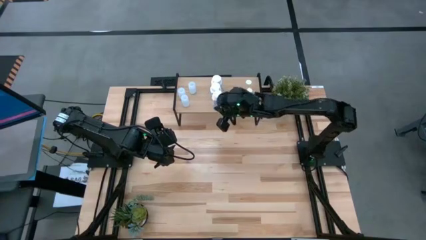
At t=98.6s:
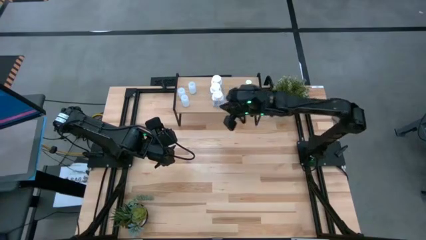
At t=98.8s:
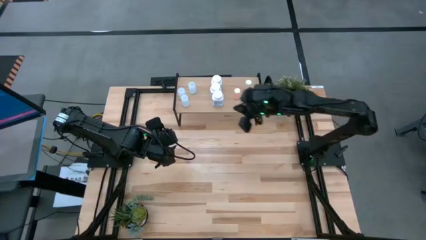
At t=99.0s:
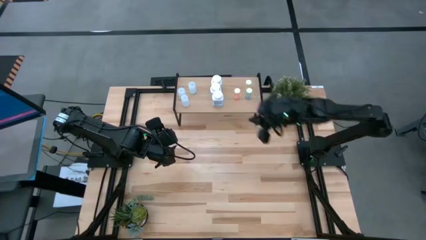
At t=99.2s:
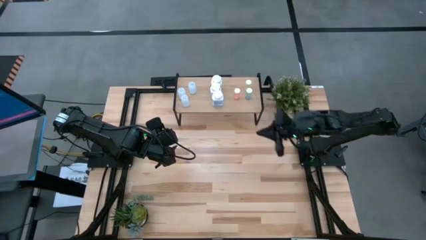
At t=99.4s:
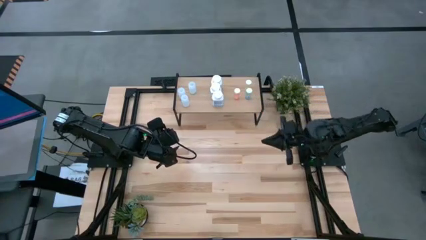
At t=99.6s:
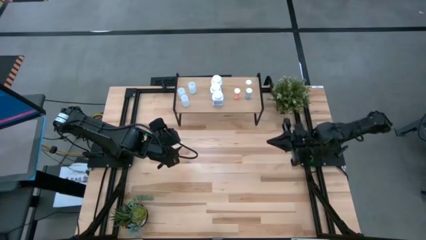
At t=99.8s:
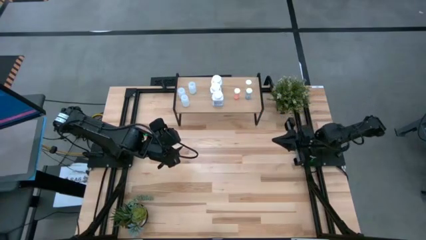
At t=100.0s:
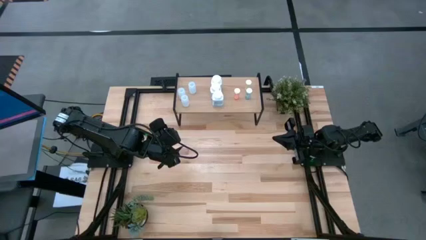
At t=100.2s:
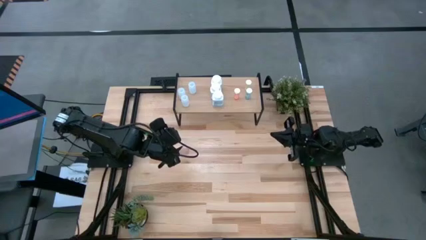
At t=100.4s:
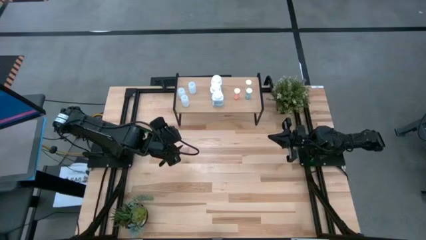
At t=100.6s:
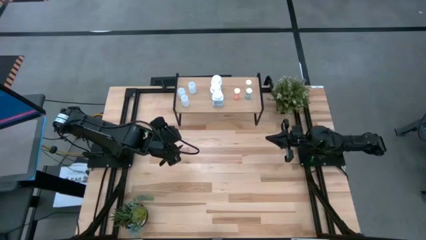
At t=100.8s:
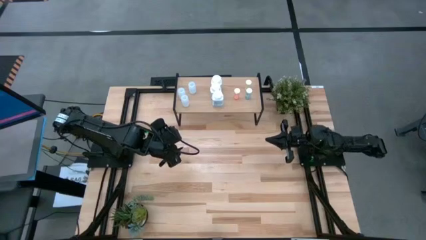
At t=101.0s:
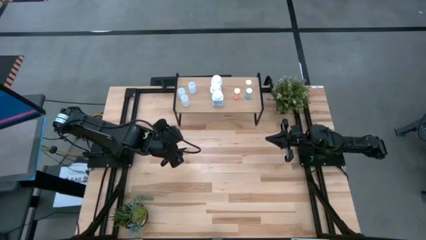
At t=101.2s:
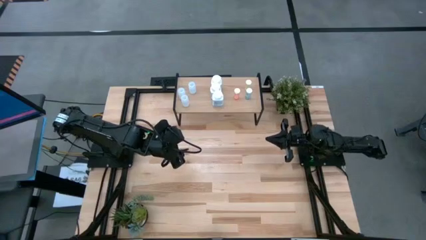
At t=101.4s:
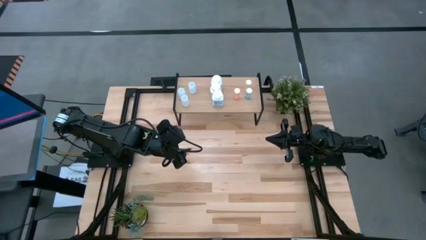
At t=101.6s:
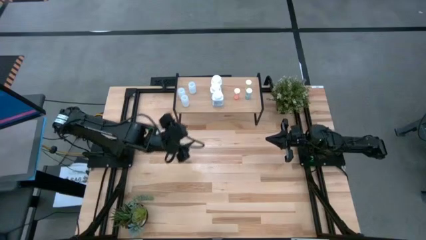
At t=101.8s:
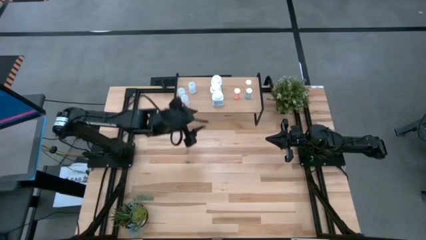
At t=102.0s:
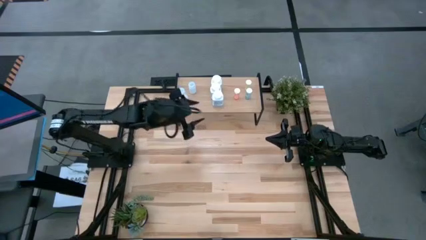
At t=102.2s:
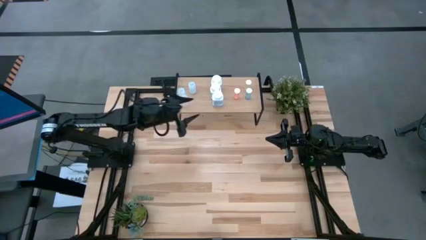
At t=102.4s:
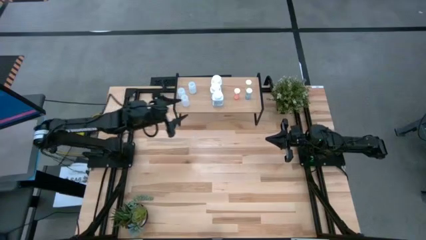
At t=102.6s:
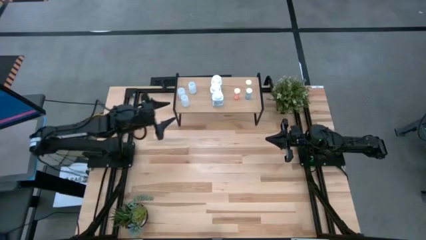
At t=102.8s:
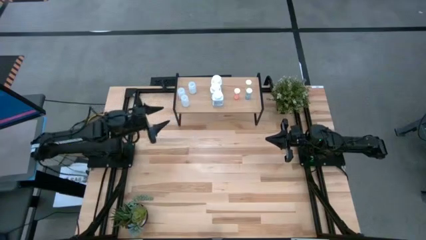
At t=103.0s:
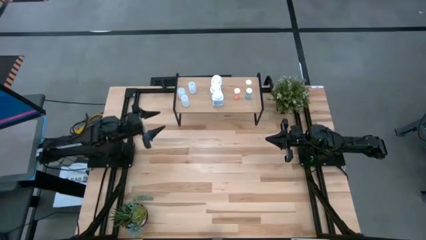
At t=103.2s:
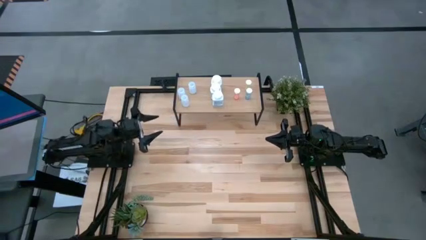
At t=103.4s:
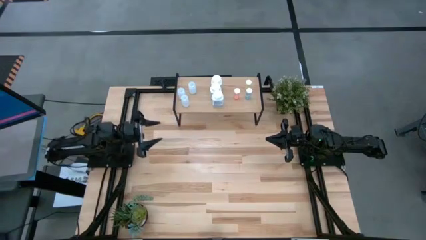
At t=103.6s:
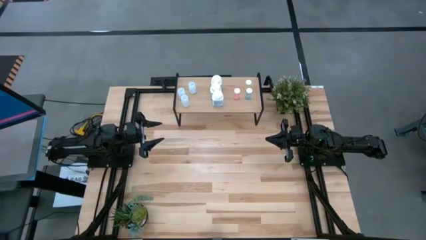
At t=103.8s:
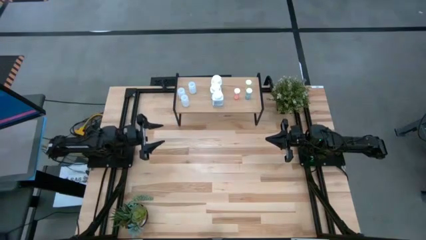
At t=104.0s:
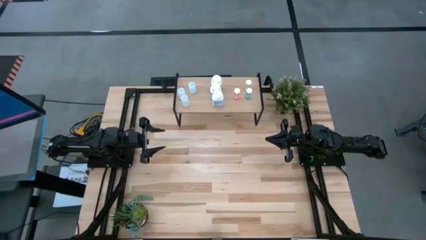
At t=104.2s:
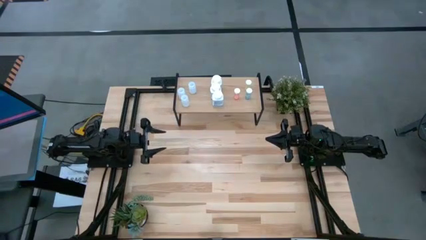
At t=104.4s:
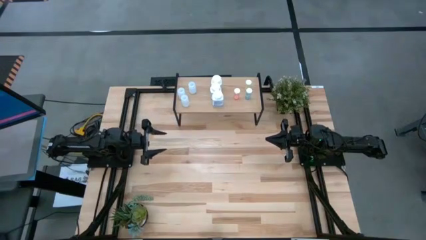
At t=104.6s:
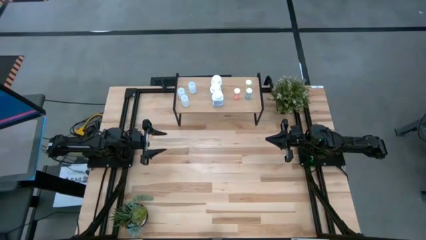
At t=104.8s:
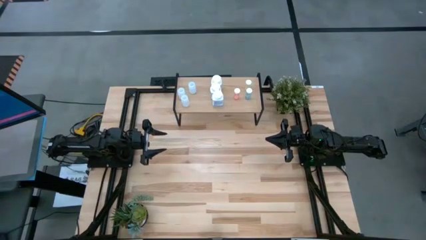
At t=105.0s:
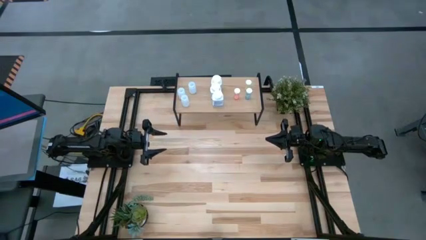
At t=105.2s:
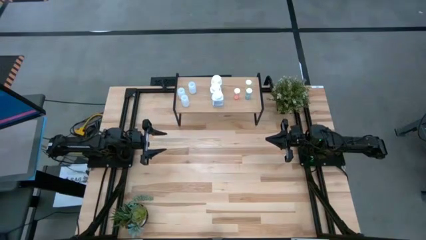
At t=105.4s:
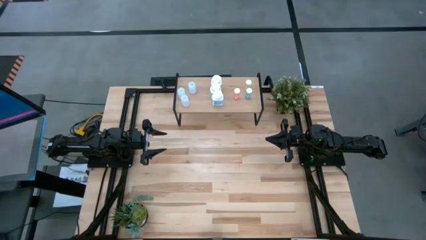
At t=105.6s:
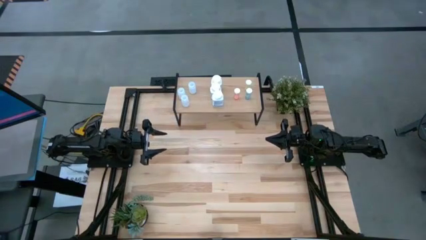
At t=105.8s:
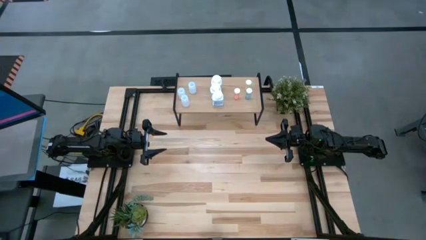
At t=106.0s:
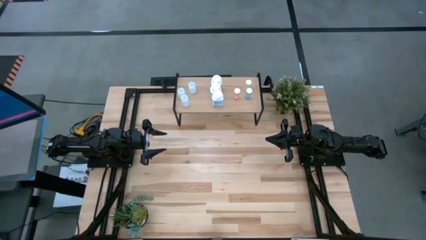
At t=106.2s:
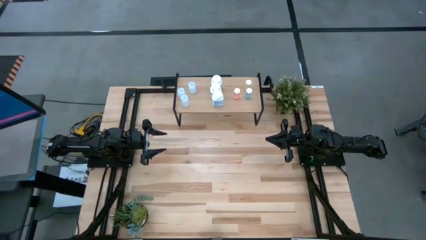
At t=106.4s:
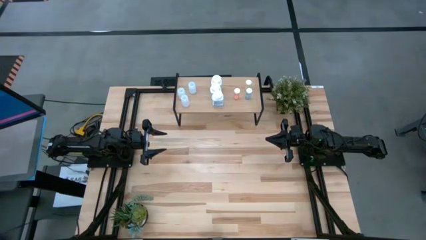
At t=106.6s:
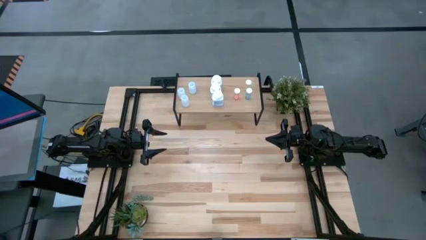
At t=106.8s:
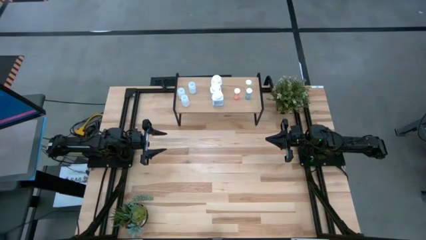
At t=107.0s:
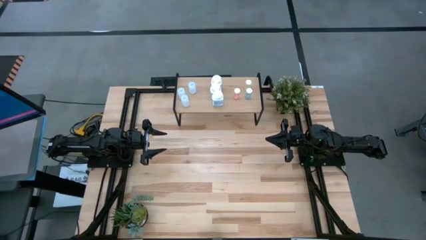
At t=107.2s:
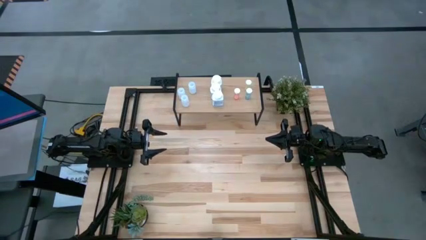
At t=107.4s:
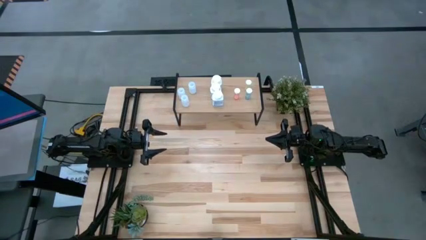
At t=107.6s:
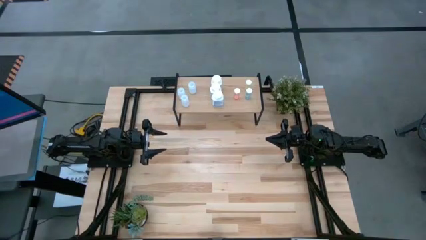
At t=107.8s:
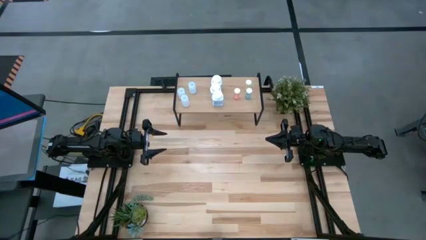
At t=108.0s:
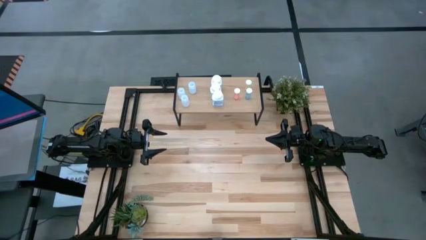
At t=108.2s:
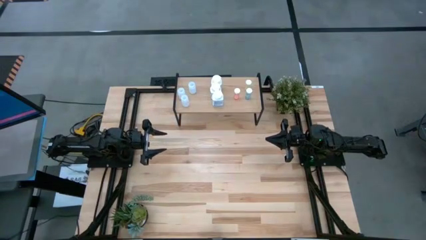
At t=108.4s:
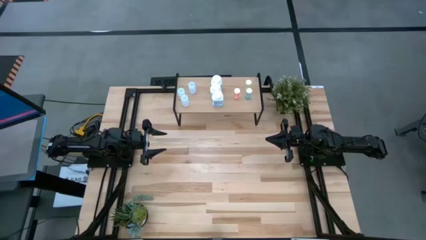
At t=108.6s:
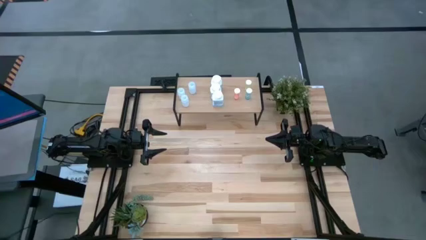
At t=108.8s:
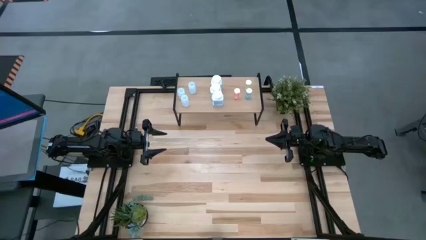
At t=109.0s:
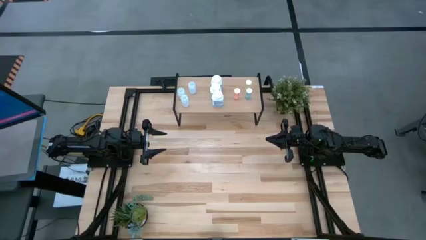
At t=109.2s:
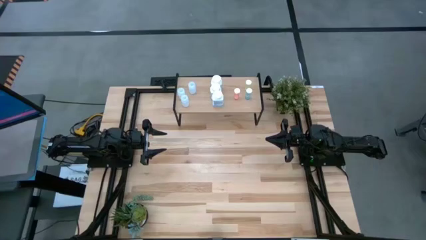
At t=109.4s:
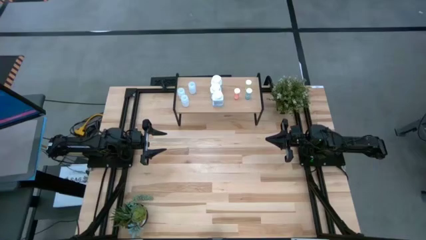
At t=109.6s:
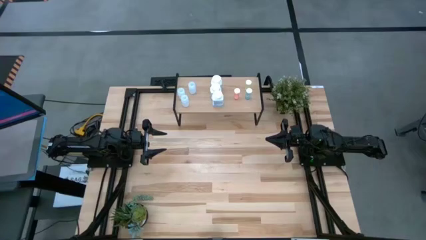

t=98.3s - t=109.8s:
Task: Pick and place medicine bottles onto shelf by color
Return to Home Position

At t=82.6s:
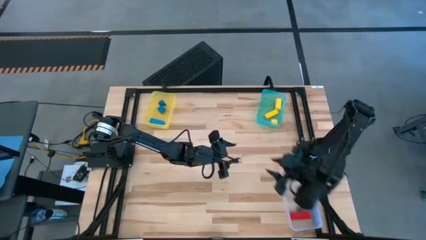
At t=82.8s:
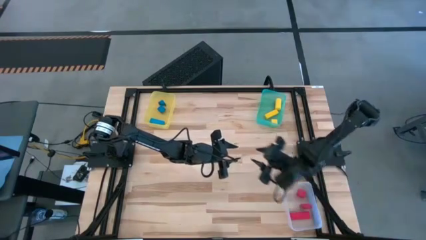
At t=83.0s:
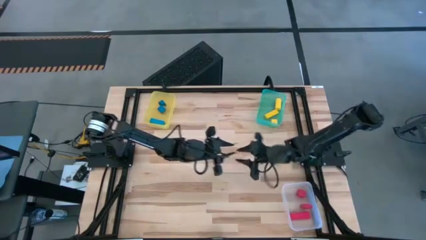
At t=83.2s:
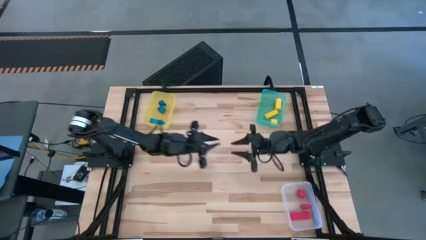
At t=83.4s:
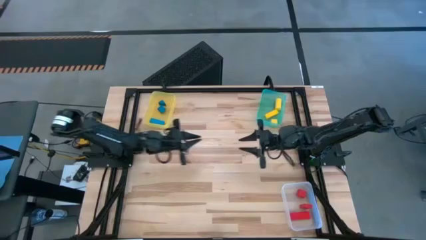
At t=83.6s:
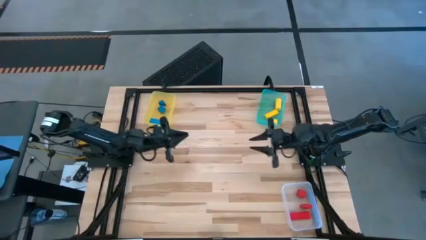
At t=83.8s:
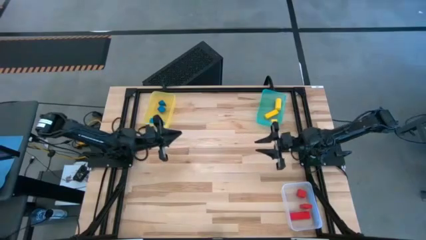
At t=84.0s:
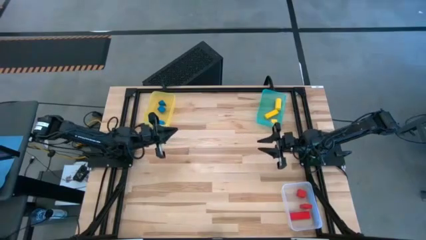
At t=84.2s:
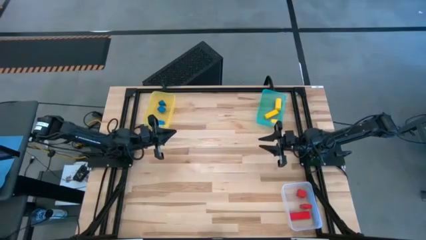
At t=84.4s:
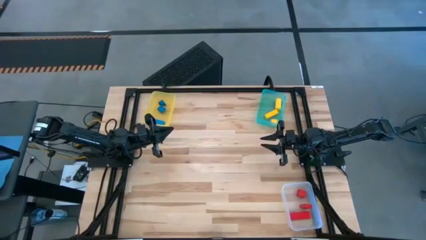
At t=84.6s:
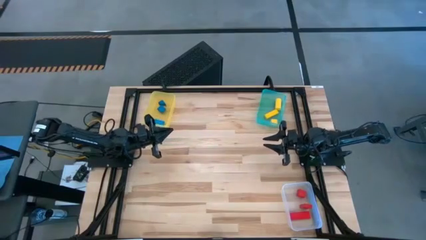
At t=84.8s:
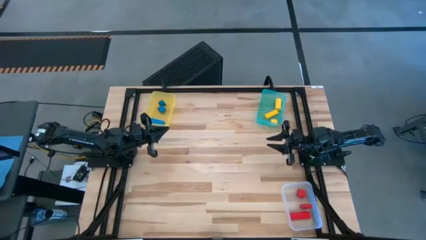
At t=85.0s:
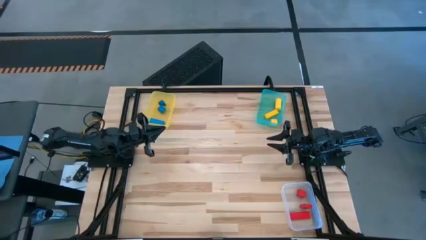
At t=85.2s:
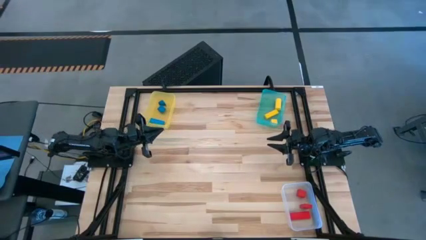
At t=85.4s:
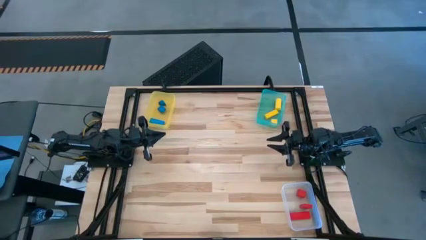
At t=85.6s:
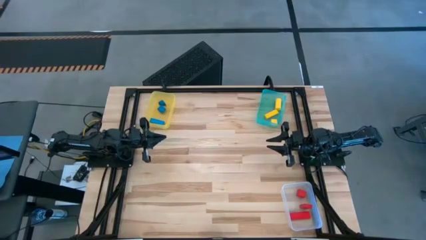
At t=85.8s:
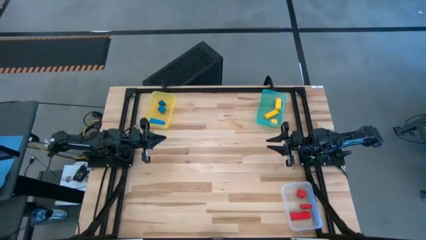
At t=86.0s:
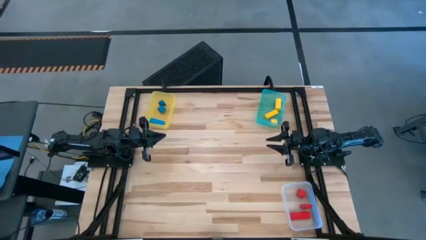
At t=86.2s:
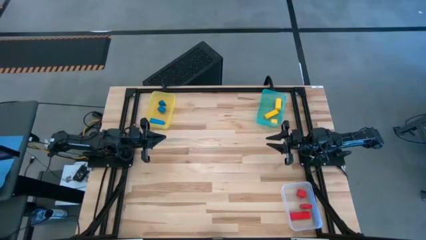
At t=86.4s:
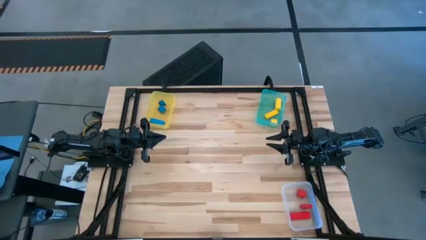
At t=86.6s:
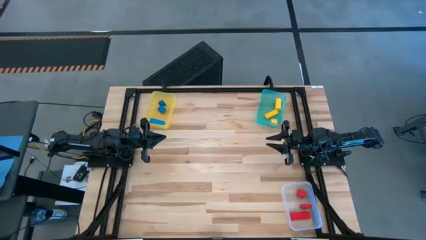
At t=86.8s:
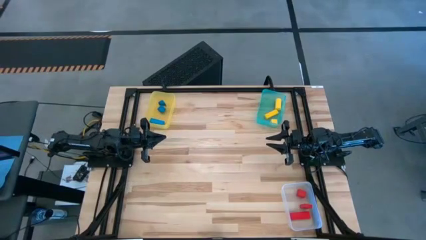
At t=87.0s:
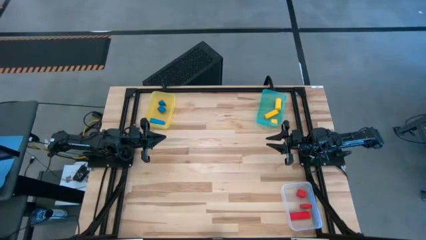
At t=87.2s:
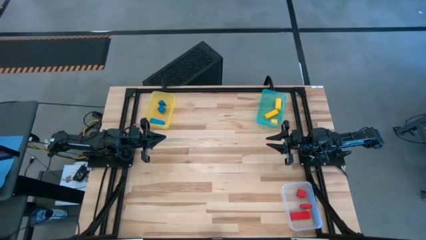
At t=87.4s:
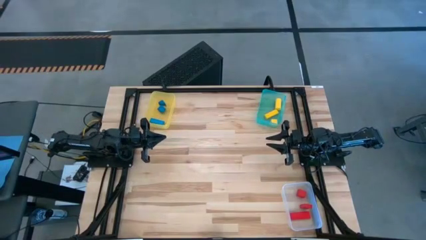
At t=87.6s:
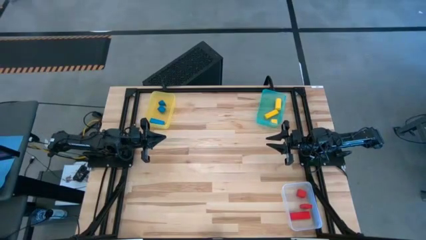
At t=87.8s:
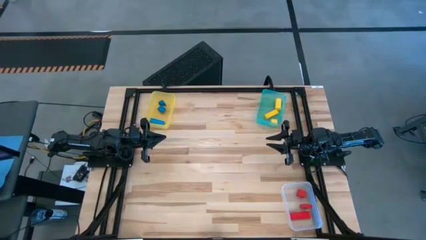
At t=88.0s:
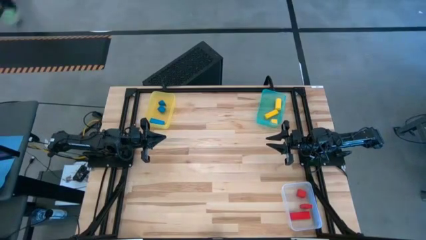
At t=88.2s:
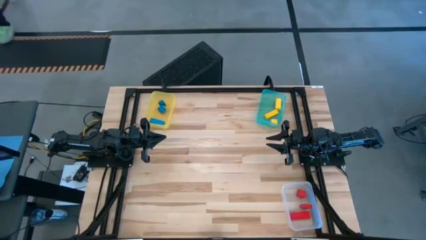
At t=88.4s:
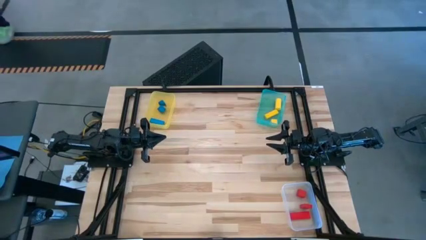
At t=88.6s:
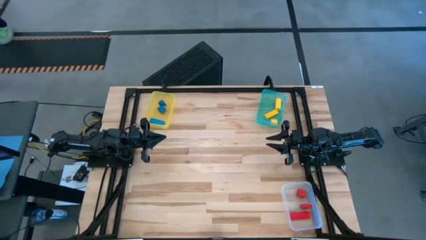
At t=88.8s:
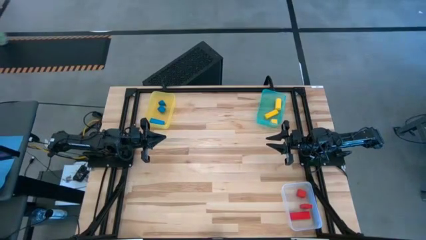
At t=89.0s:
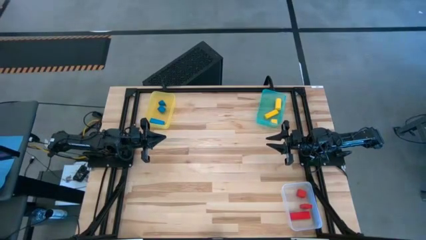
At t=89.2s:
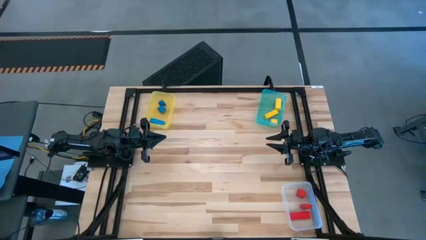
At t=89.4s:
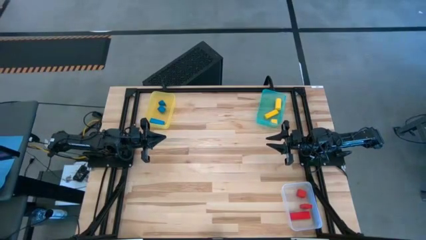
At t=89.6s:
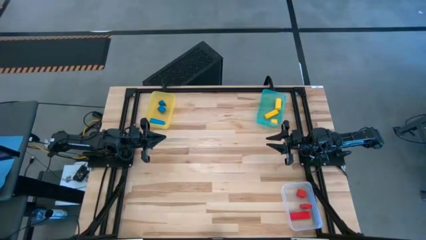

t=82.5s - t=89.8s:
Task: Sort & place blocks by color
Return to Home Position
